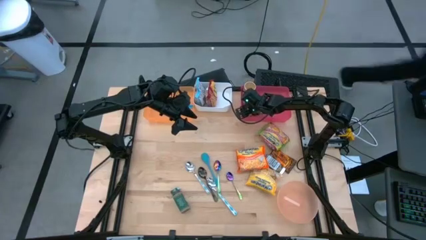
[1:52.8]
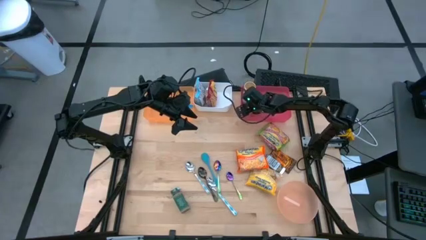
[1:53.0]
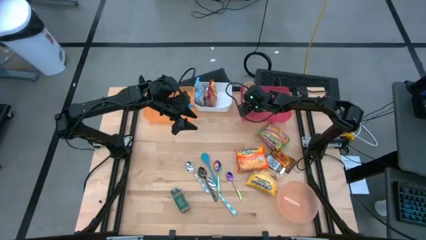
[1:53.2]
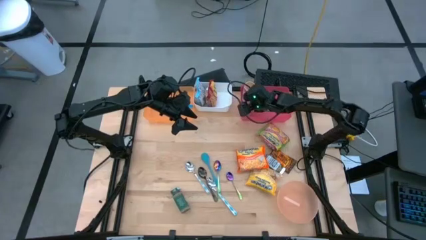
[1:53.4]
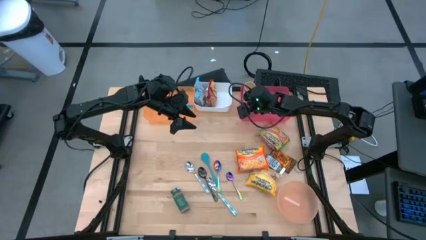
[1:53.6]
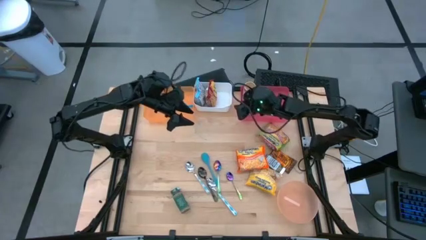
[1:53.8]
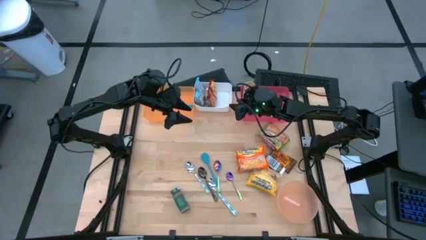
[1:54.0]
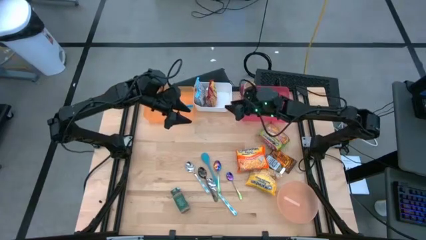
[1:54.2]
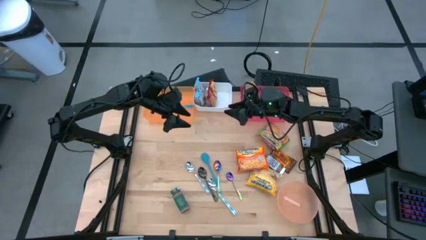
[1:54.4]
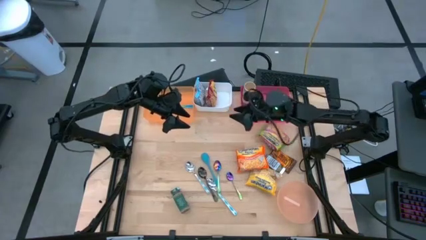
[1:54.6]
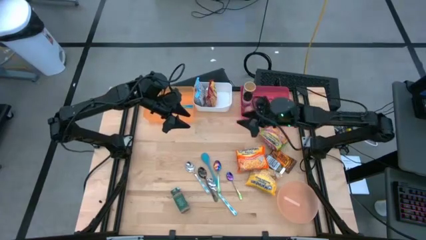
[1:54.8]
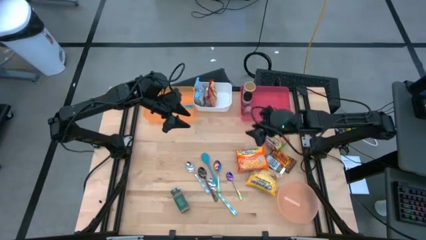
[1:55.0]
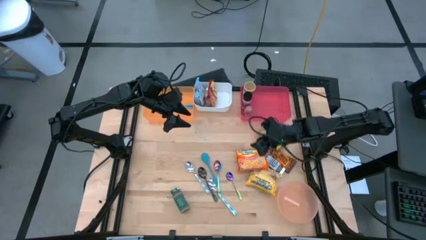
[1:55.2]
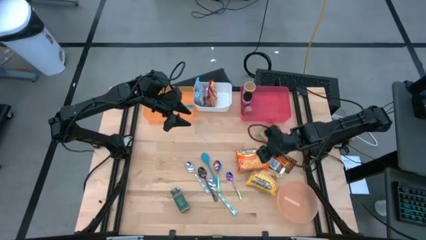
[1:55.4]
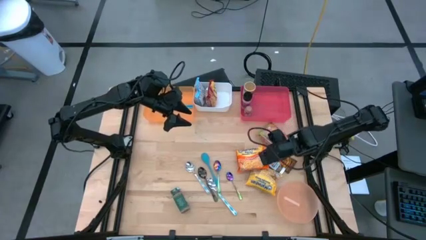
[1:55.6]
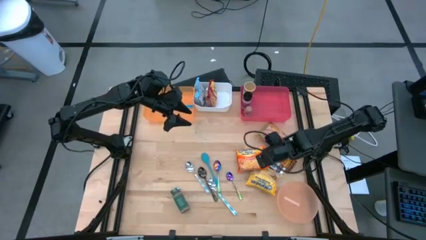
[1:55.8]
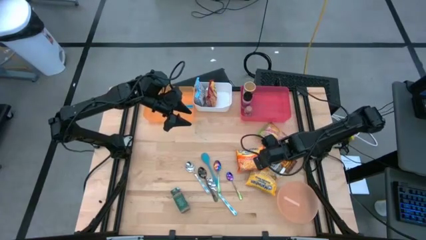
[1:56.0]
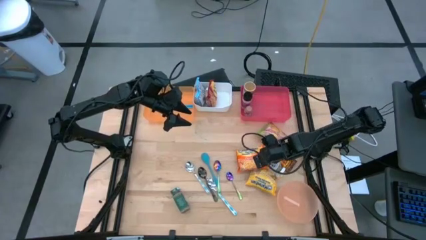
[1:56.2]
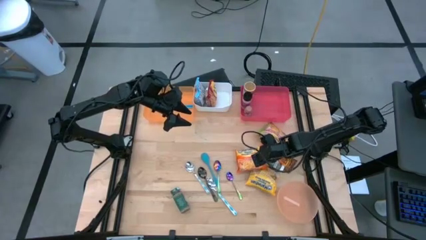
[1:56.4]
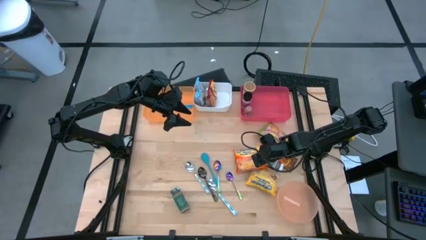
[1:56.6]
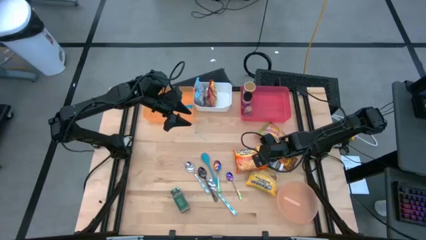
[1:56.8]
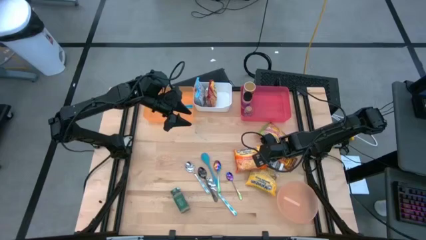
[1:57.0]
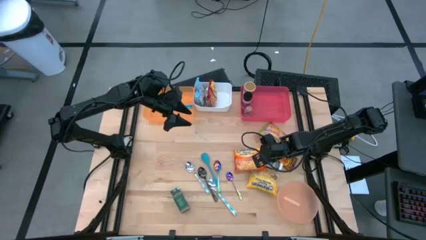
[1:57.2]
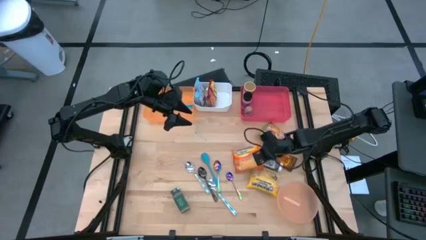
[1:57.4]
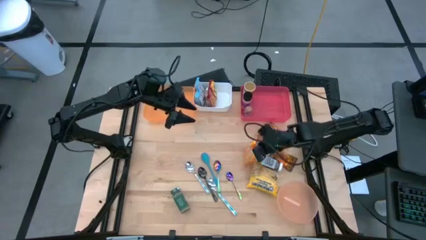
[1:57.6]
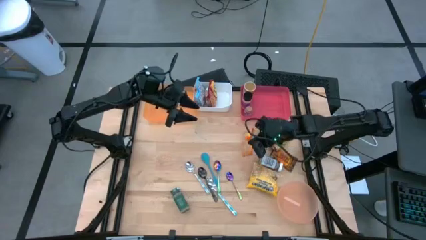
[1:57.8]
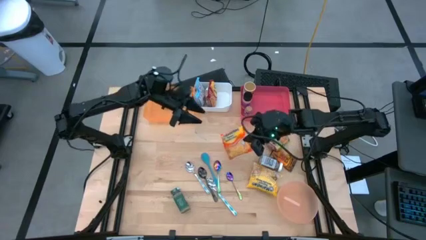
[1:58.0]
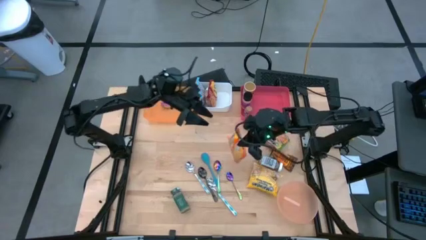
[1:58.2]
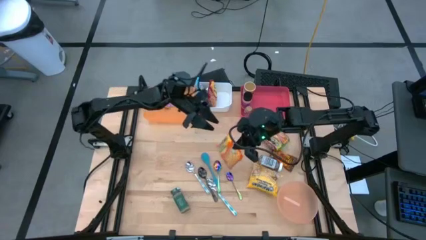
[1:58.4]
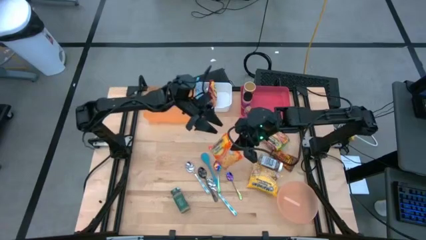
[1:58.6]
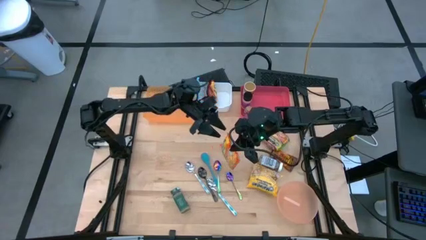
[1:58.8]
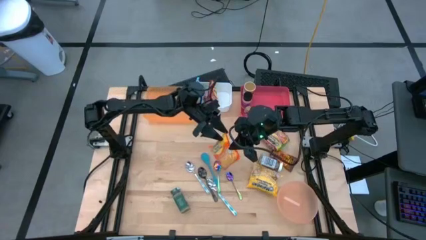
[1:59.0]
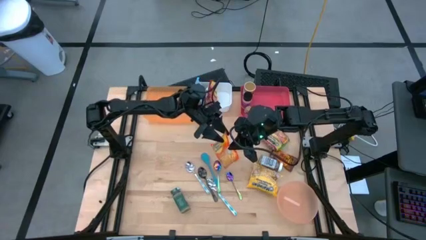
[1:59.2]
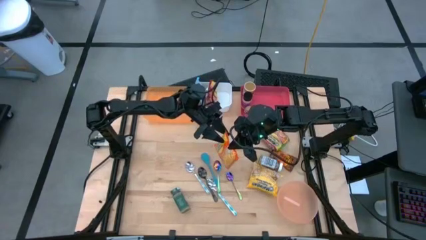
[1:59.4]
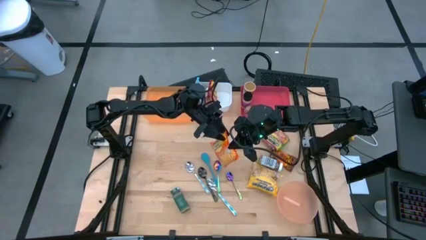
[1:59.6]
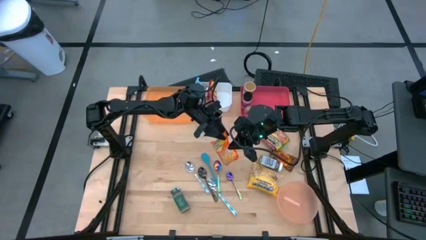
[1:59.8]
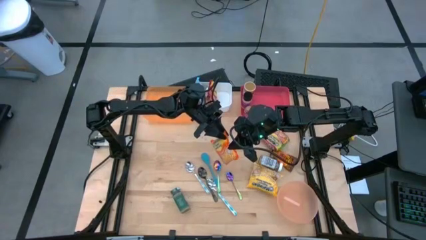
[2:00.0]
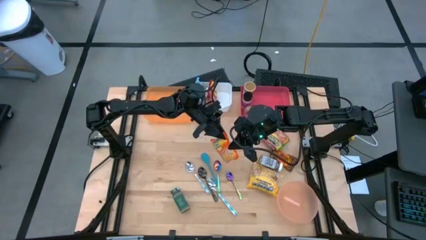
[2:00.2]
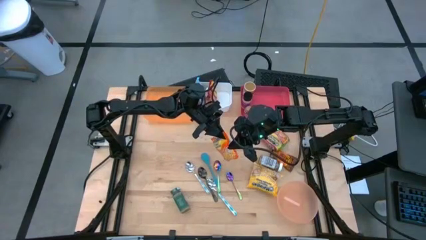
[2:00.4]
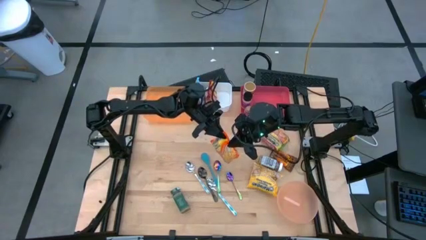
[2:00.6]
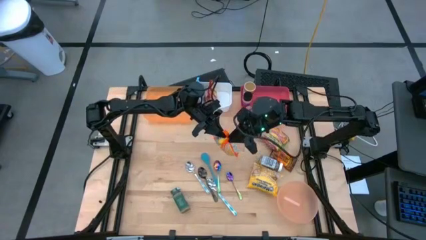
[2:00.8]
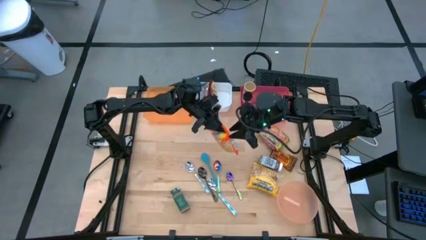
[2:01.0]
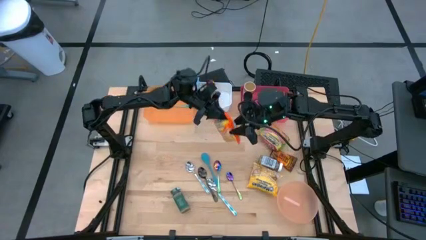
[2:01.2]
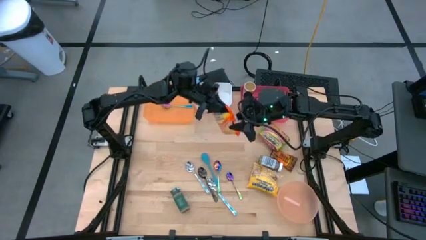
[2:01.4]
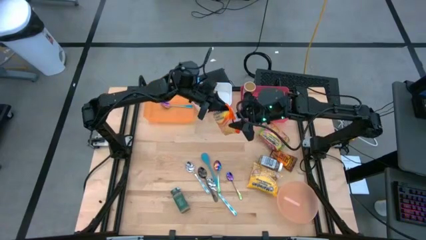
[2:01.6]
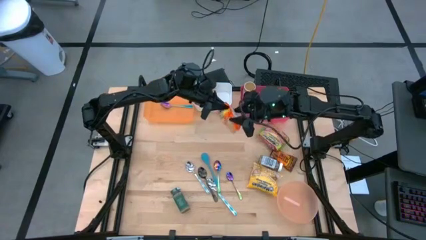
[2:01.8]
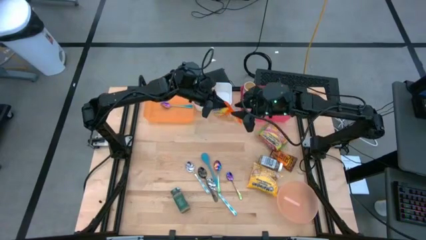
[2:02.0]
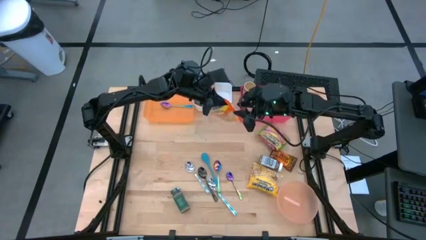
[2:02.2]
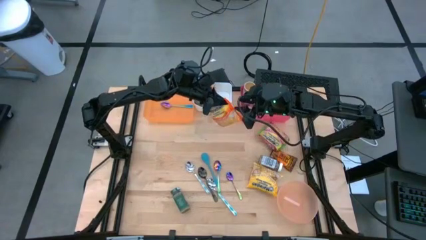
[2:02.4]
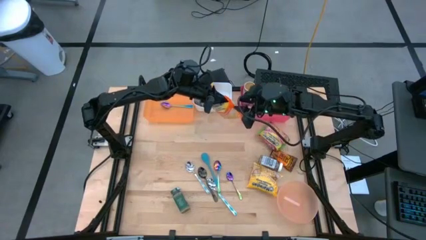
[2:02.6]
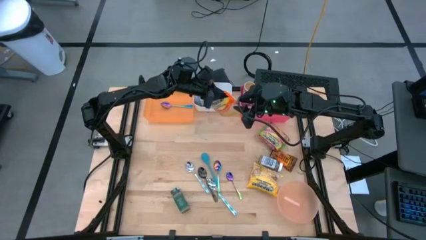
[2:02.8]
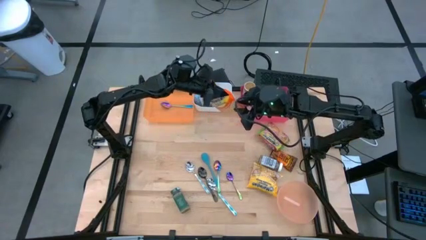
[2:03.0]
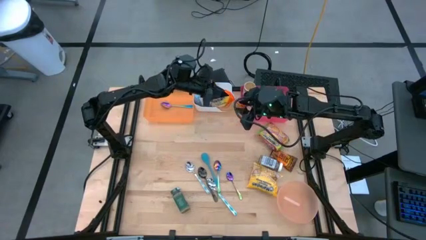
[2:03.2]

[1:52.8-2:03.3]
Task: Pick & Place Food Item
Put the orange noodle pack into the white bin
